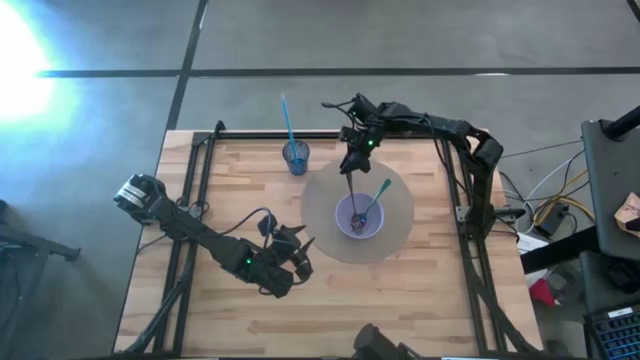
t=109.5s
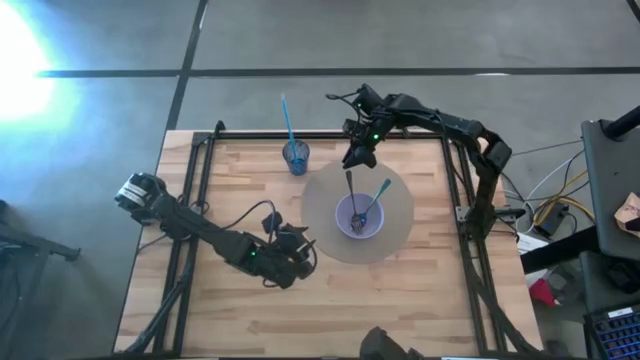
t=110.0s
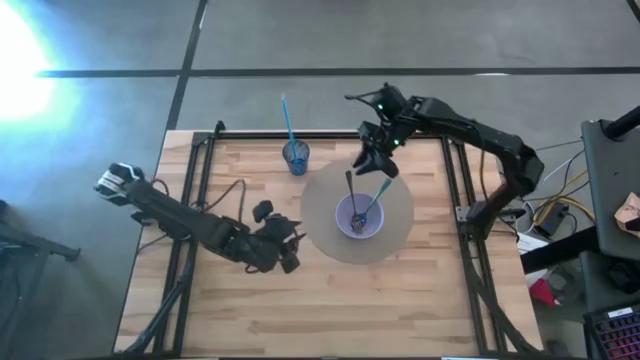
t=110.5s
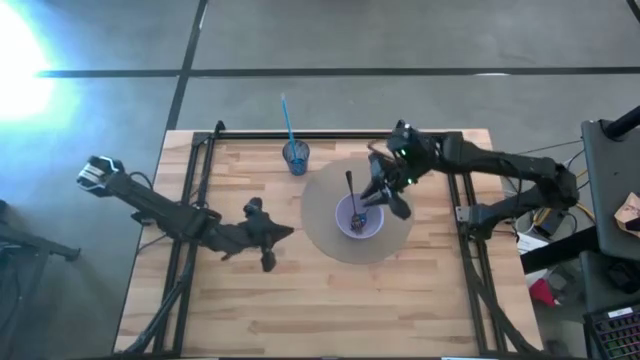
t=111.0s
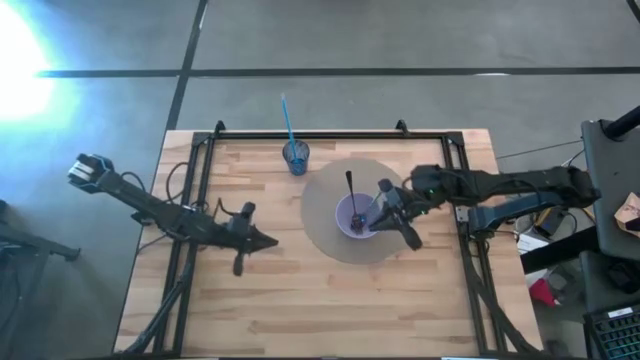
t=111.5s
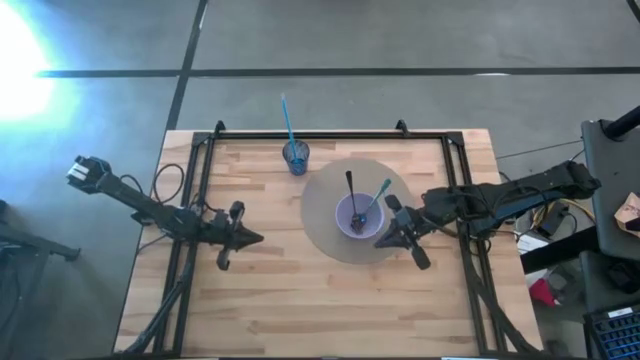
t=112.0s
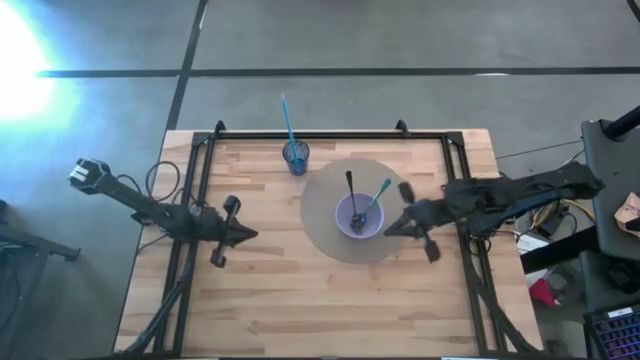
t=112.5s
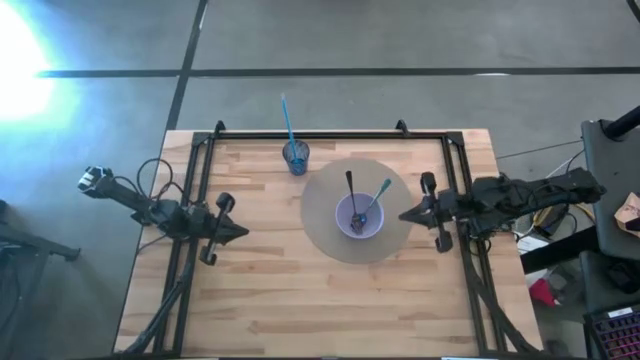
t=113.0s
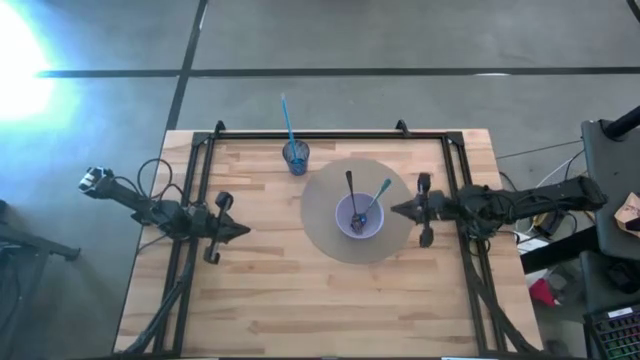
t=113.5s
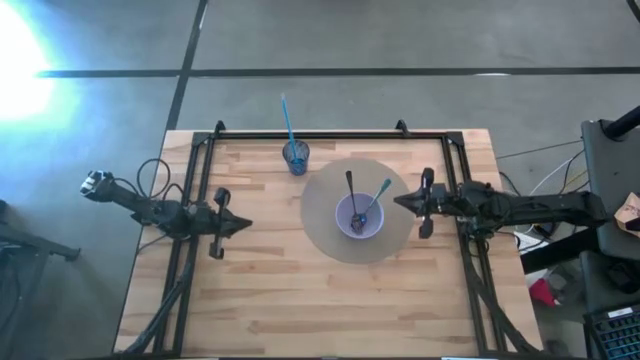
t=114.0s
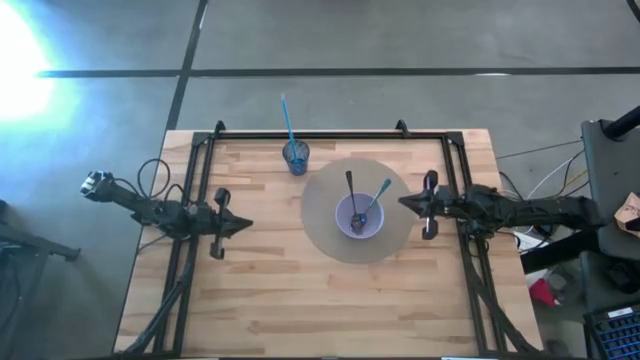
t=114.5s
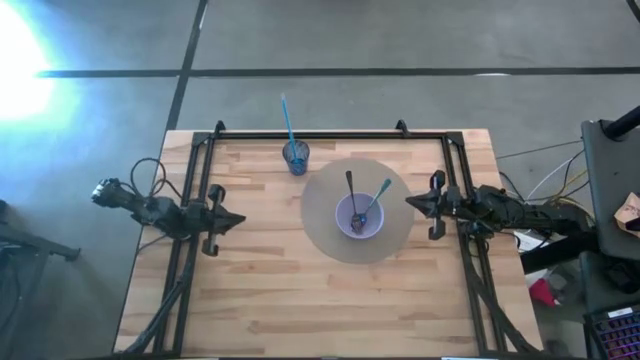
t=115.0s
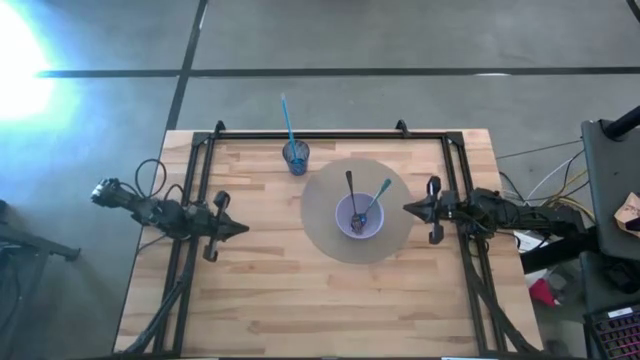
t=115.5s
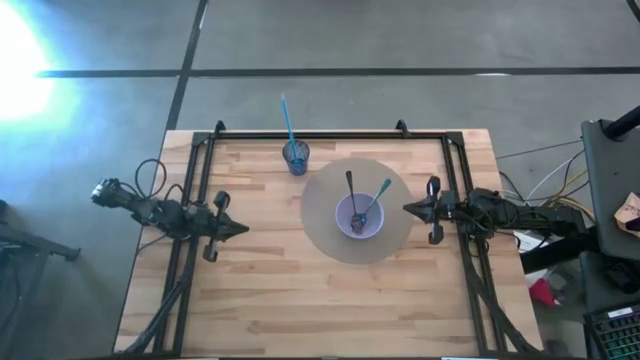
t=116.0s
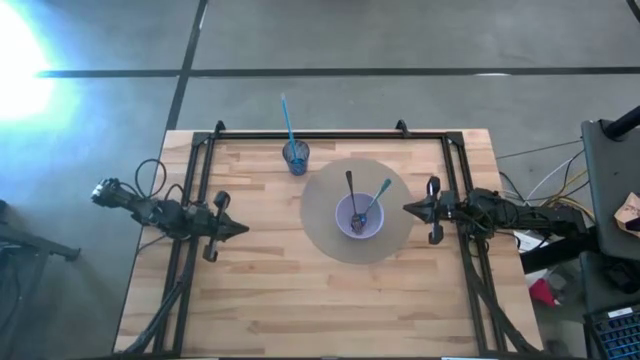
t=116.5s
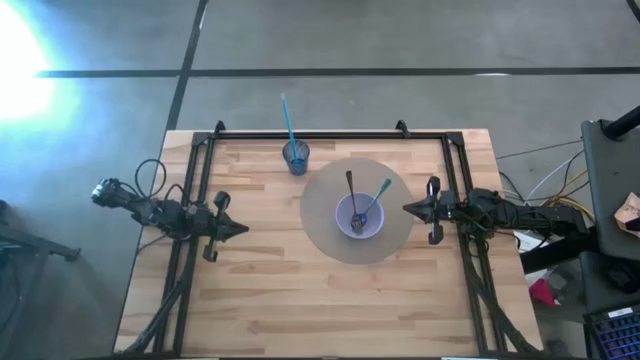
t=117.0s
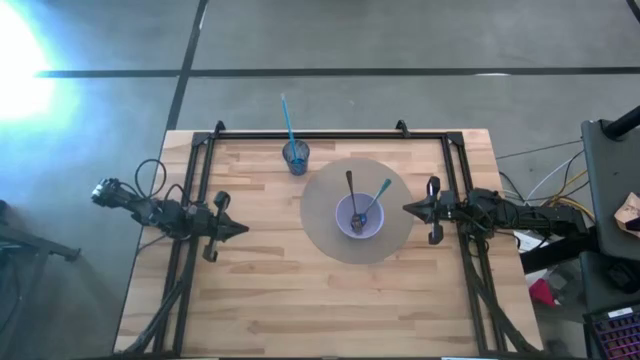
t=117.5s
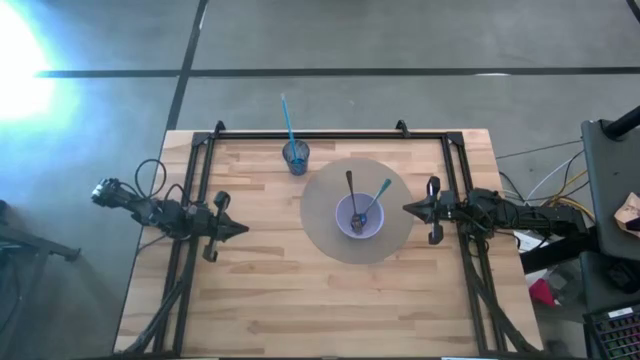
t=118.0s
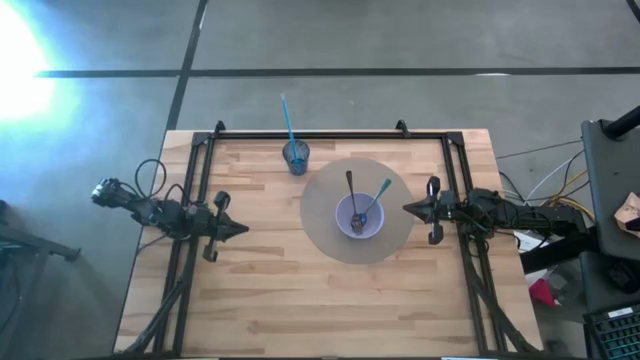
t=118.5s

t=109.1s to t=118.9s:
Task: Pick & Place Utensil
Return to Home Position

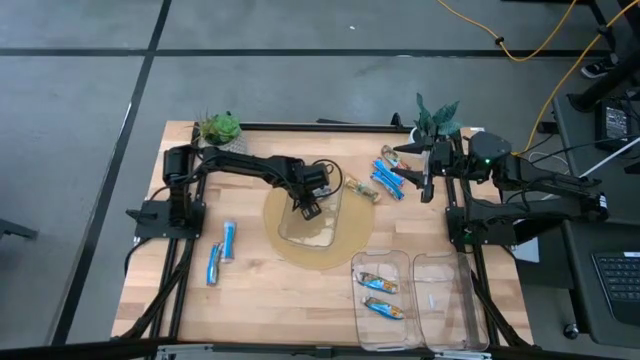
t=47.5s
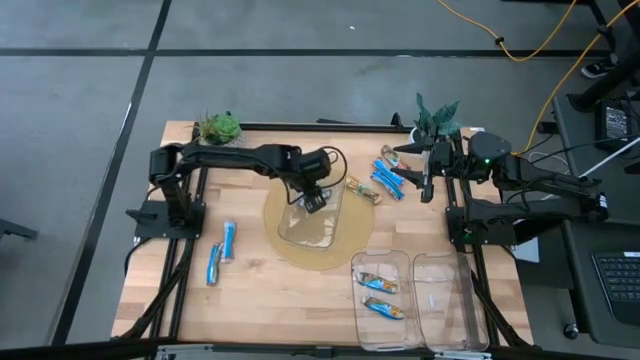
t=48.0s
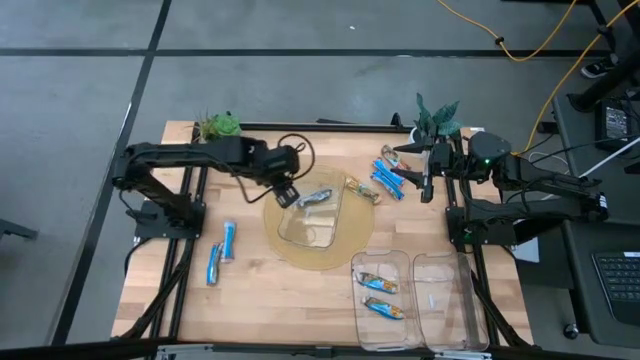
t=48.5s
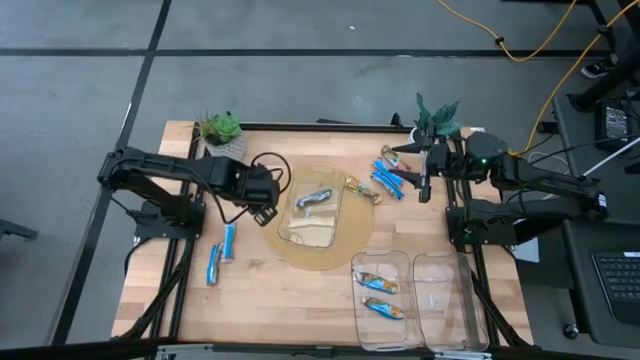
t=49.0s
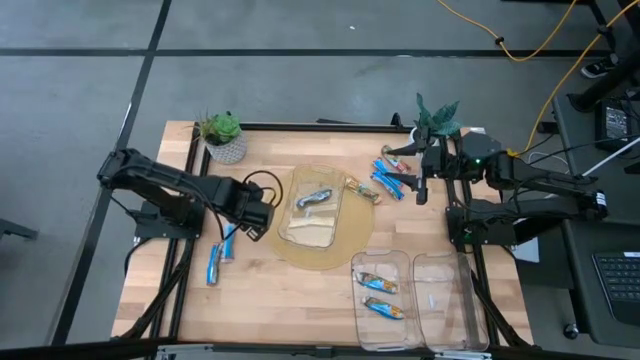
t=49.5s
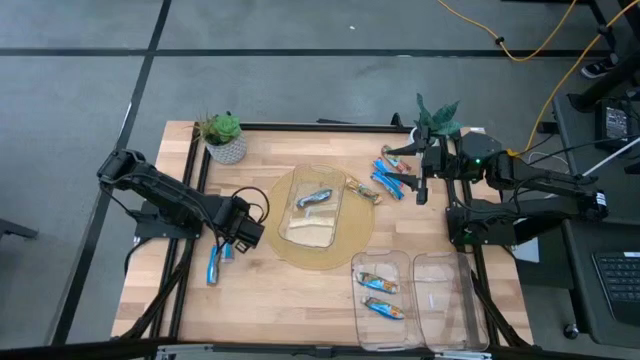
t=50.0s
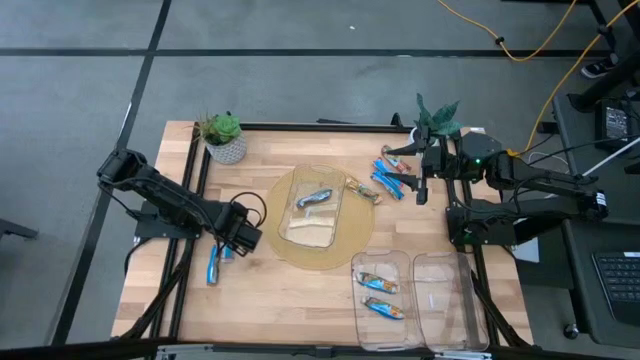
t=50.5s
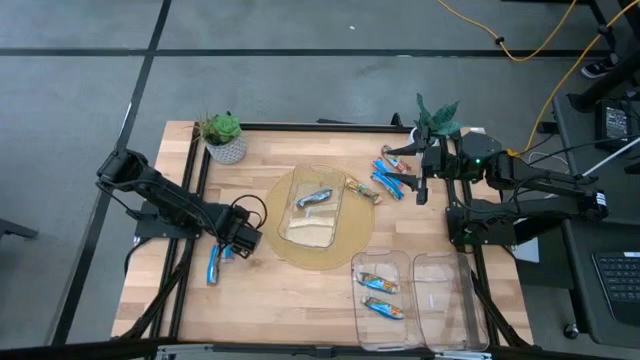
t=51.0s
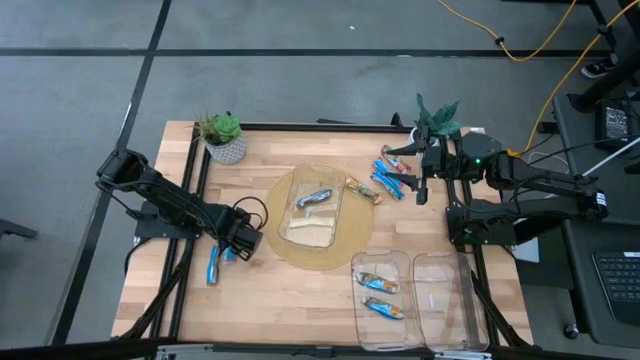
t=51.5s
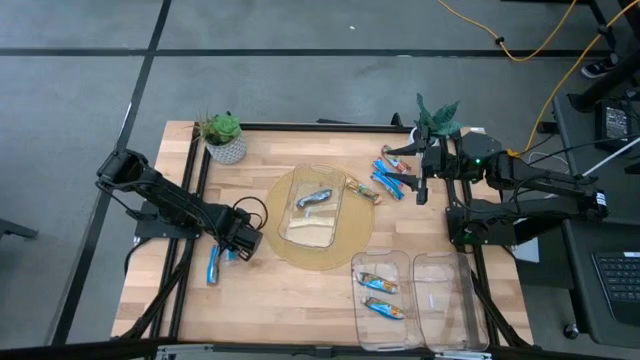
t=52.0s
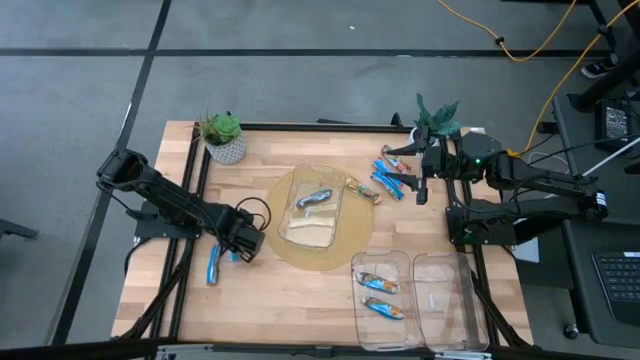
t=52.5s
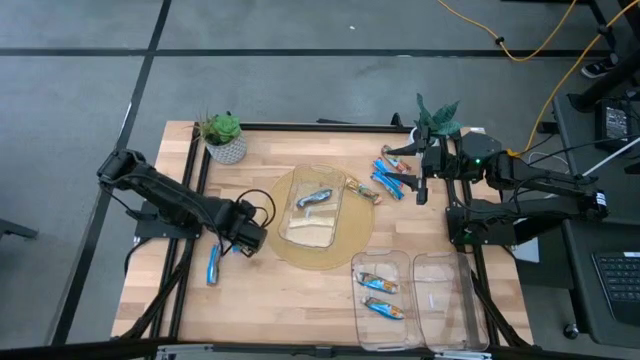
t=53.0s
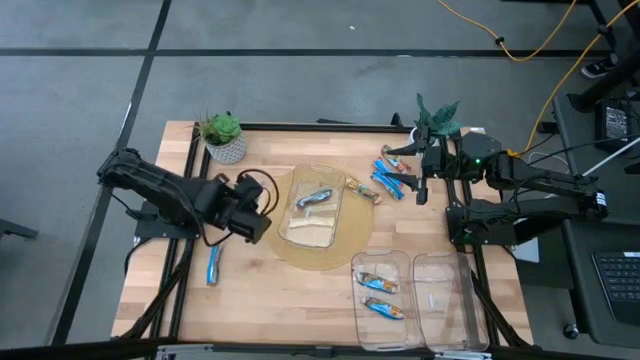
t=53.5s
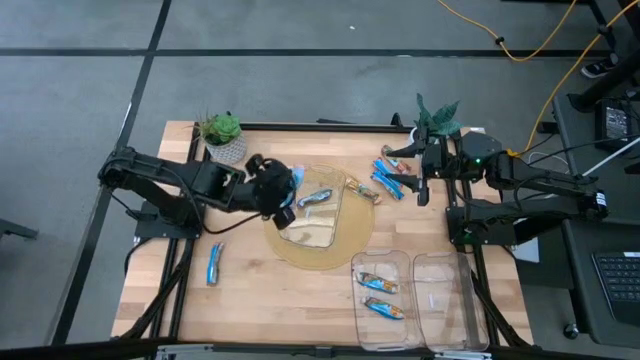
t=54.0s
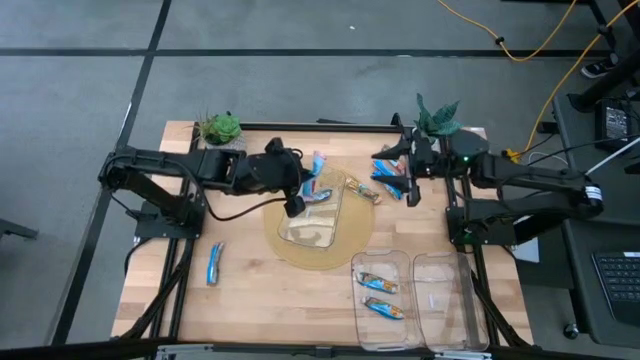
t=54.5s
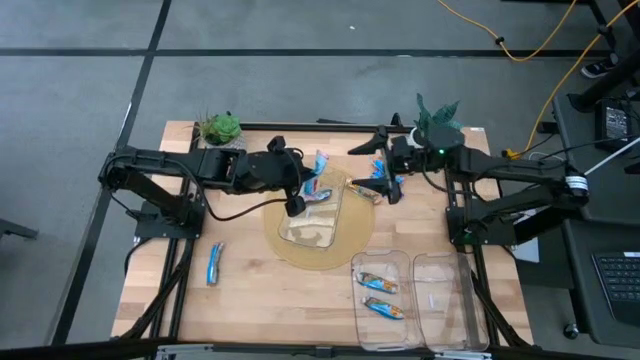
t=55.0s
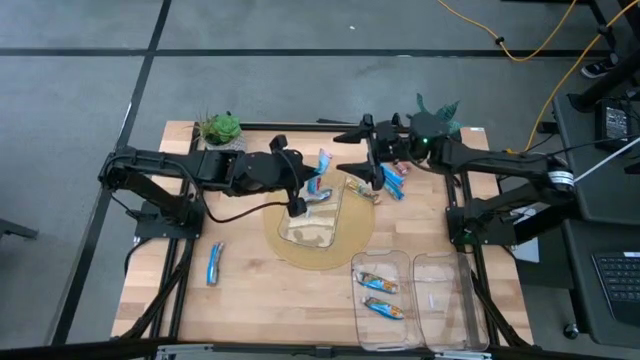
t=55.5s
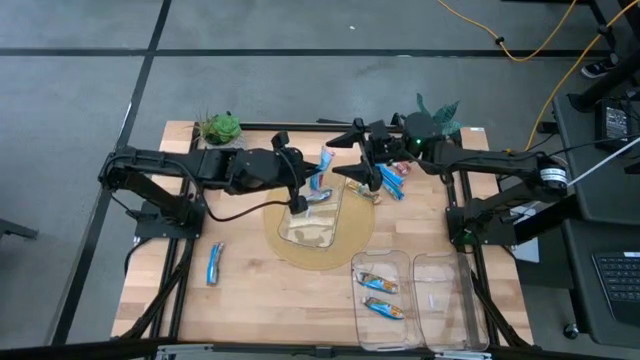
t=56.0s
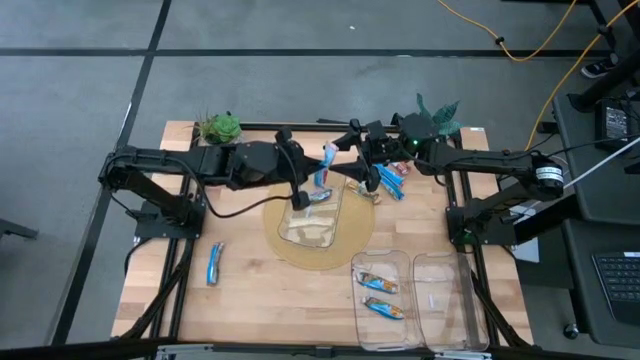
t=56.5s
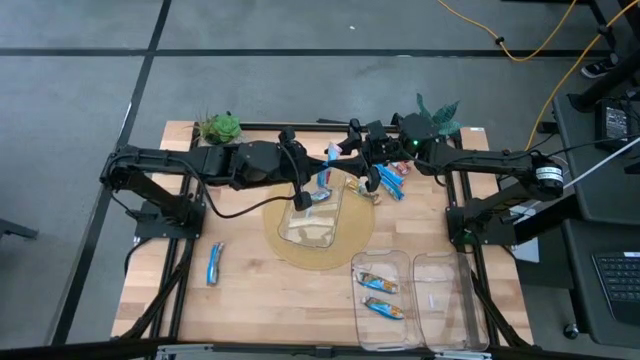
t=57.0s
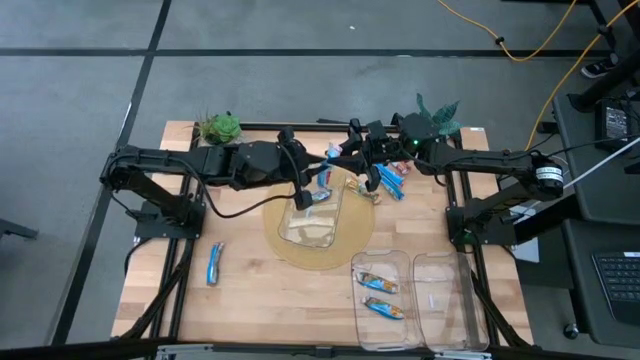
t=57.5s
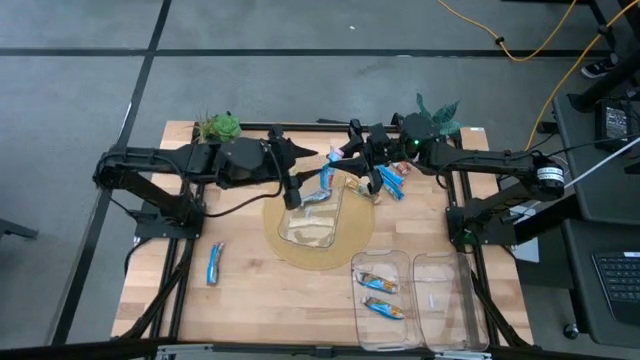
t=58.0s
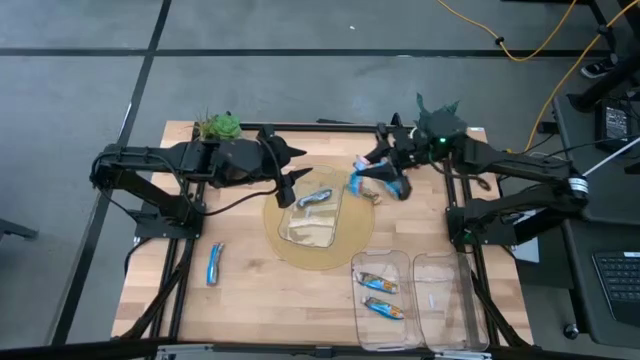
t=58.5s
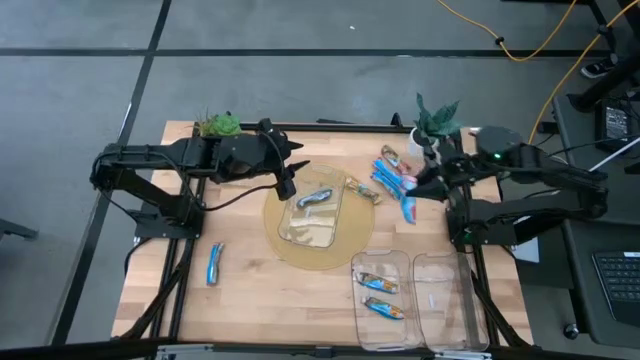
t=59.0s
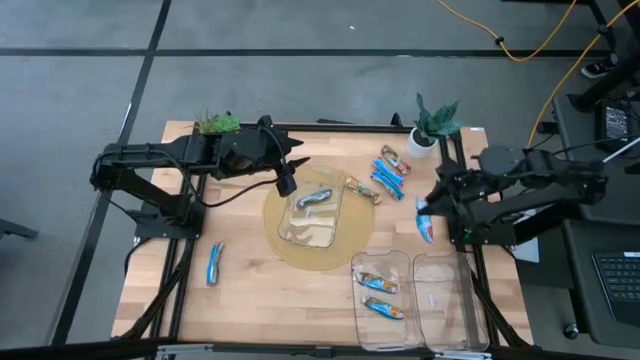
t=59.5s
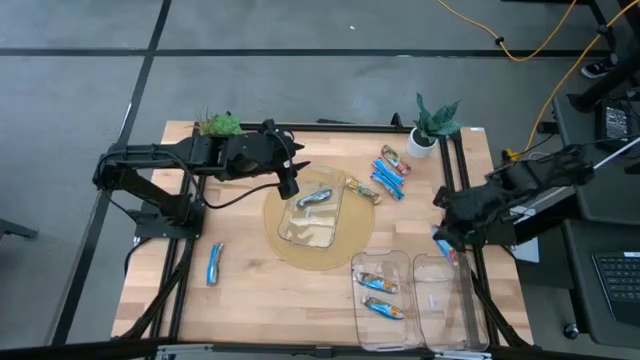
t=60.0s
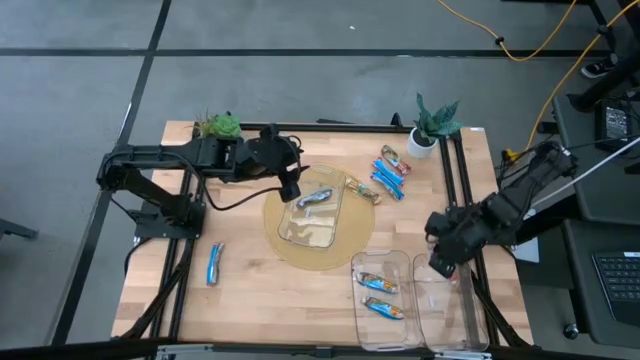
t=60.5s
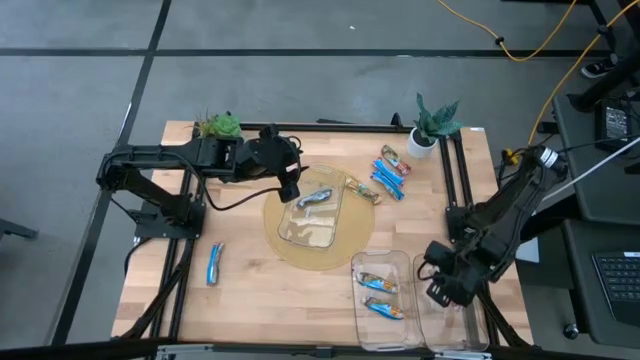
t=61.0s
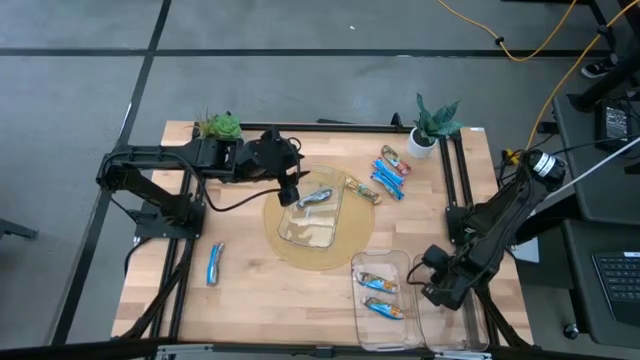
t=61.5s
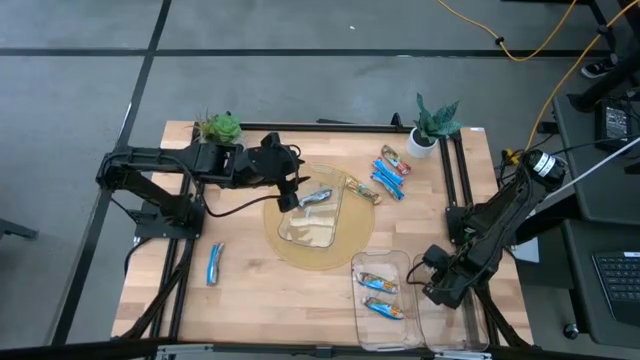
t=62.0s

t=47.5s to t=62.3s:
Task: Pick and place Granola Bars by type
Put the red granola bar pack into the bottom right transparent bin
